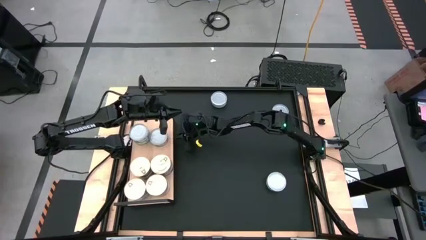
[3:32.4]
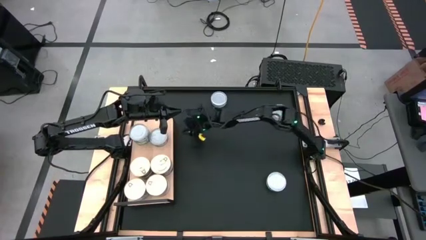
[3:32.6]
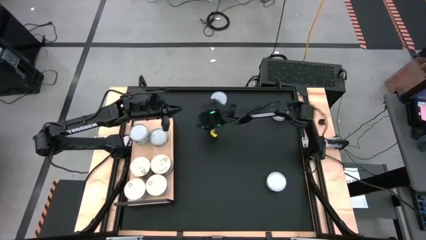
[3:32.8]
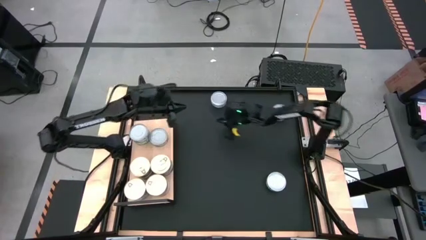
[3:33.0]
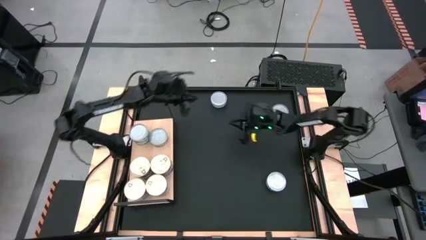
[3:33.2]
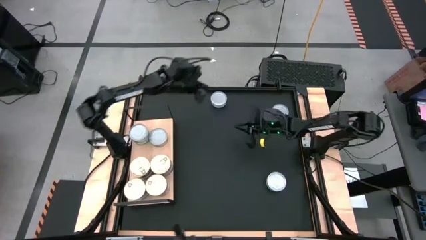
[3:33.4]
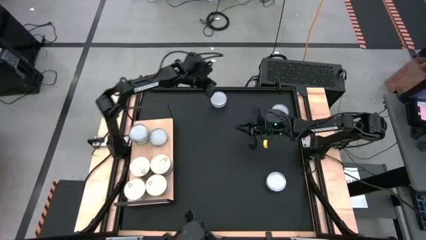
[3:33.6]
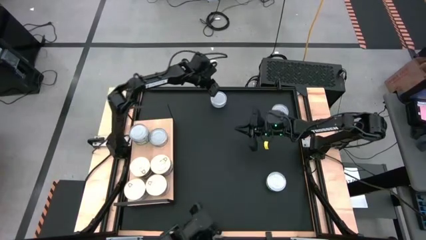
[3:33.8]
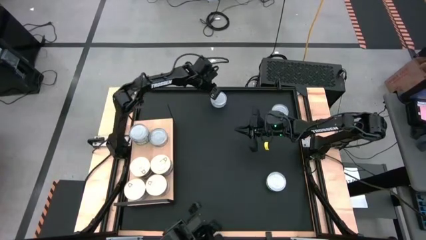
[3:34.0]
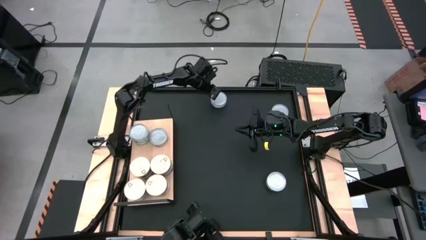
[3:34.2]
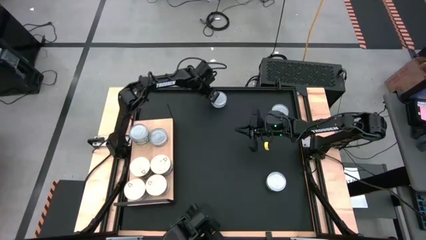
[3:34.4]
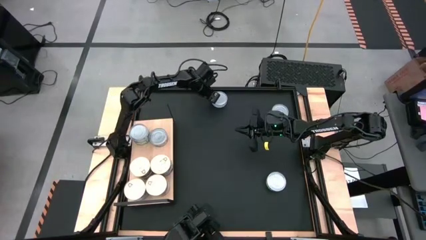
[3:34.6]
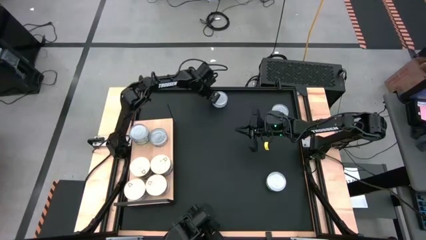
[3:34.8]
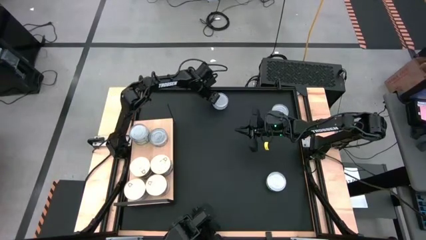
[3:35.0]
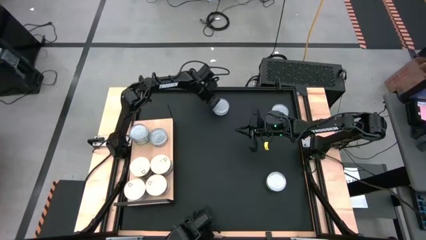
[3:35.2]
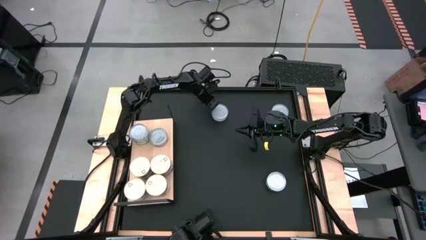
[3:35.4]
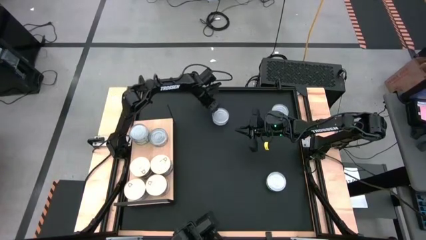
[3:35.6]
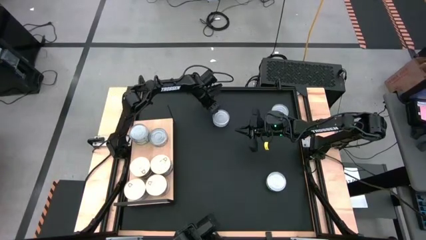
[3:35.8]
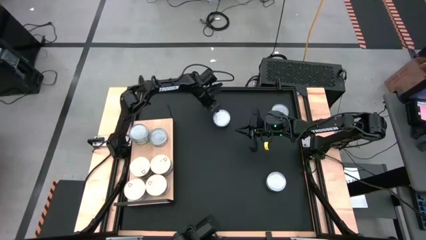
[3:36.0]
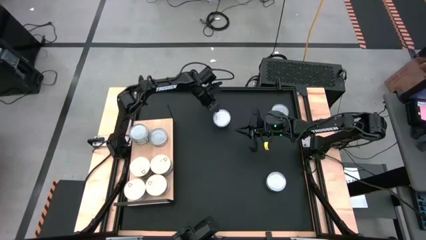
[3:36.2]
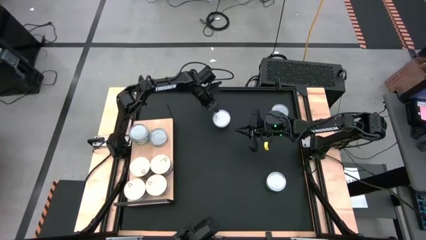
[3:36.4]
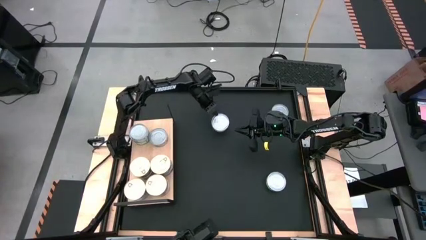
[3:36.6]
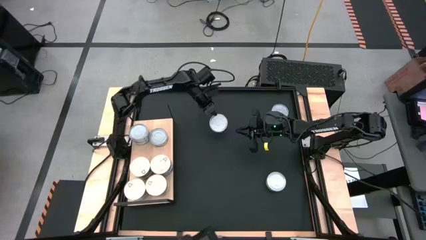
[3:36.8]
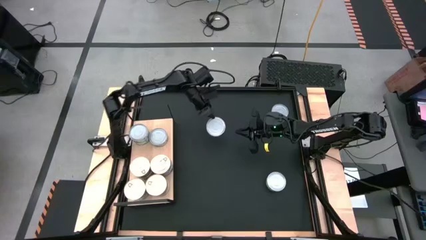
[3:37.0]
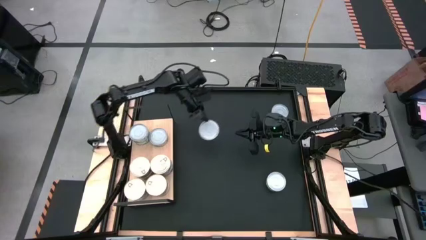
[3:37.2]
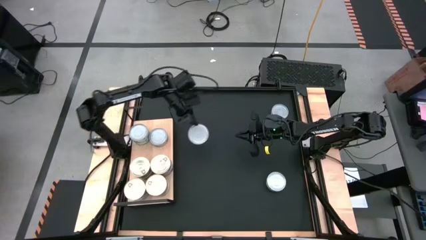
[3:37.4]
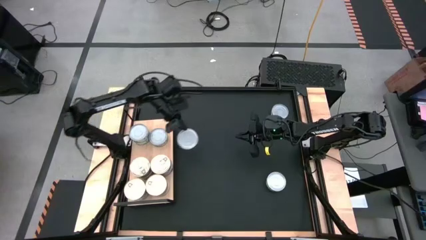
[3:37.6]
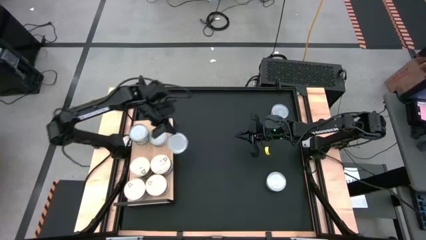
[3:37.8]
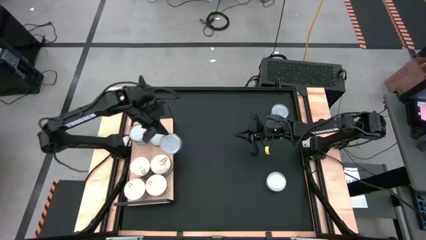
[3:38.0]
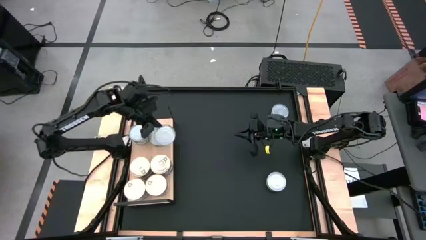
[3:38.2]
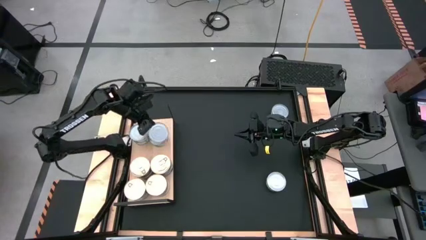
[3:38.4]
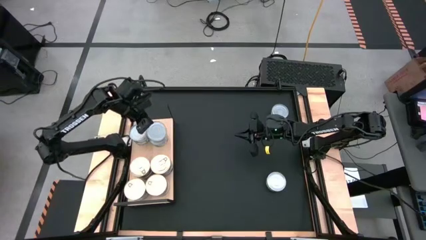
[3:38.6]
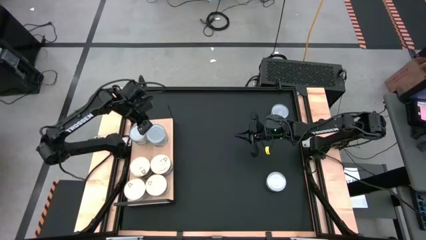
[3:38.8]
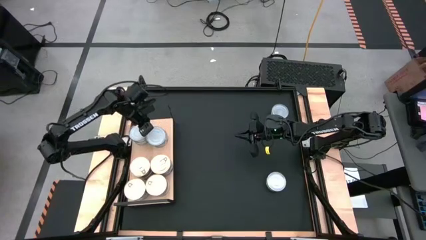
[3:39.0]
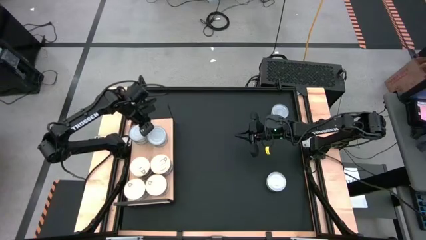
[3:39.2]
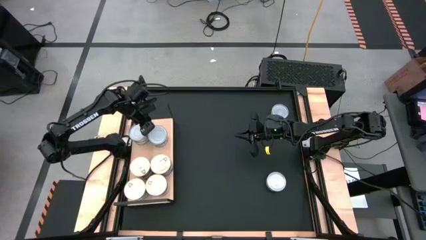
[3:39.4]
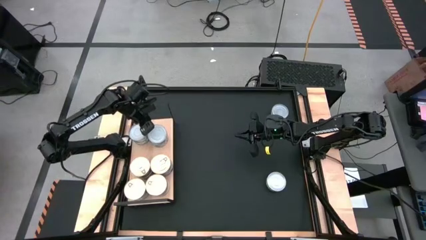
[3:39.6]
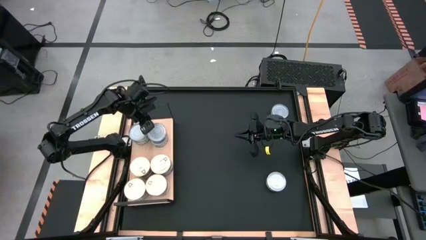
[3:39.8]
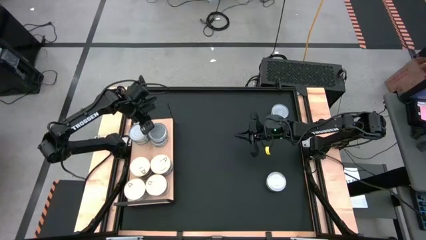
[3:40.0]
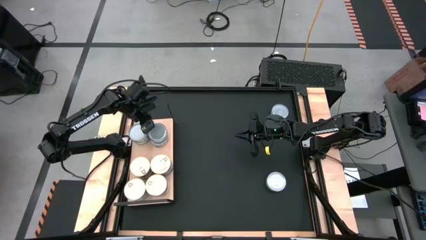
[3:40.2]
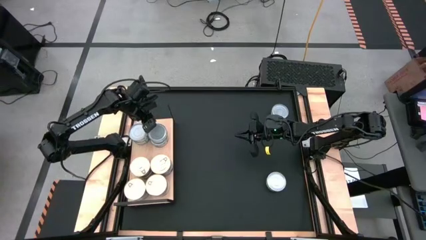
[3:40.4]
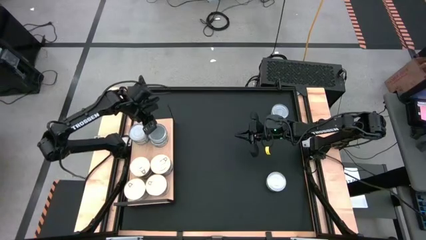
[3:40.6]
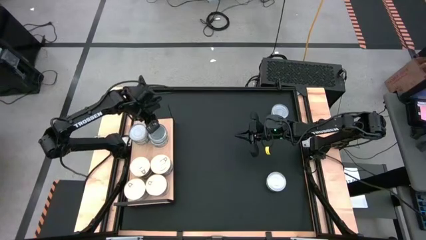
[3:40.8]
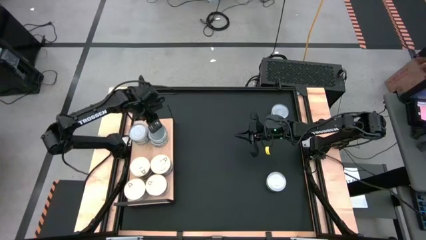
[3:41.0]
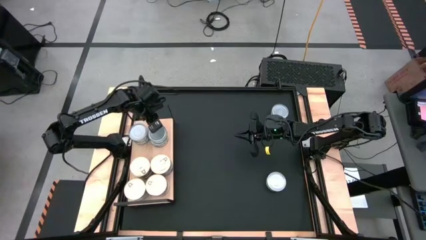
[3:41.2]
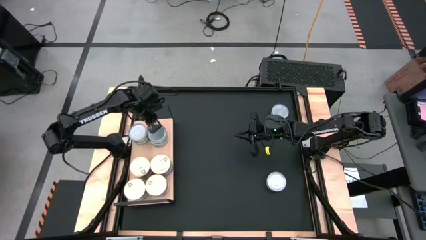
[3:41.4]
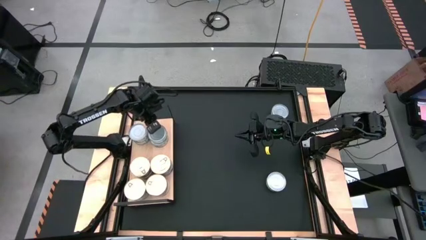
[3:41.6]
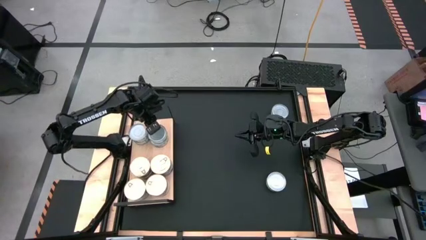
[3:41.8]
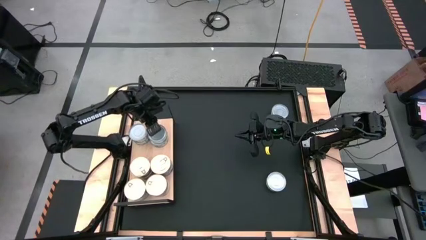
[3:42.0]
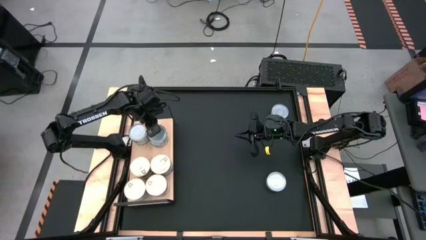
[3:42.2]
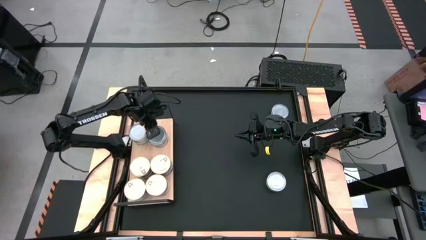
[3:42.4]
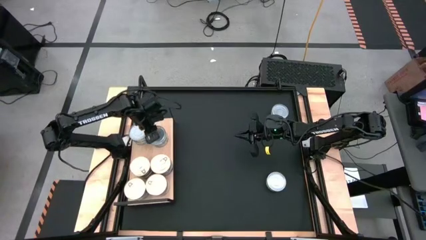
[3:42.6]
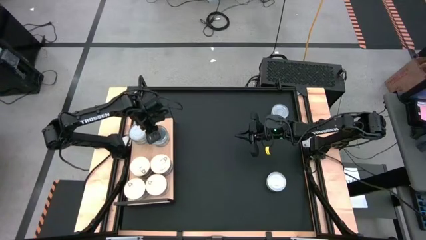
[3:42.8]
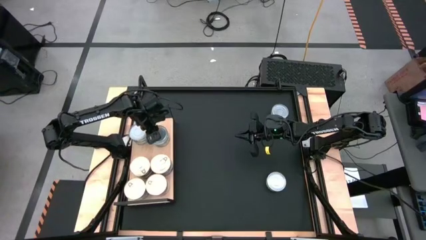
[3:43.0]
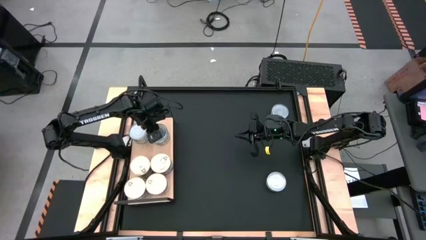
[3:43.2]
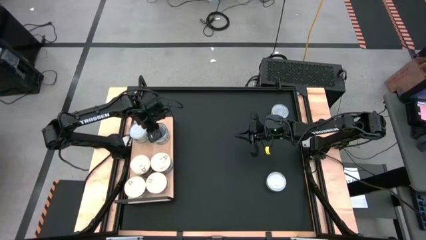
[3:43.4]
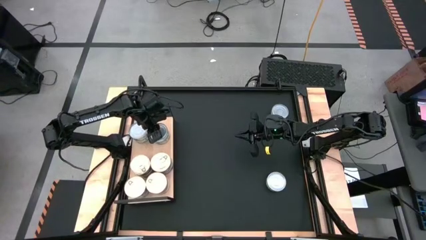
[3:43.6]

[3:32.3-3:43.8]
Task: Stack canned seafood by type on shelf
Stack the green tuna can on top of the green tuna can on the shelf

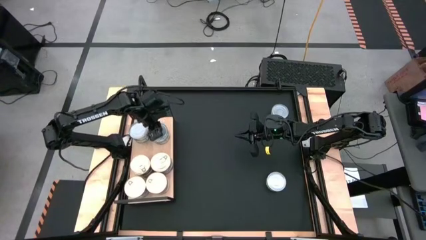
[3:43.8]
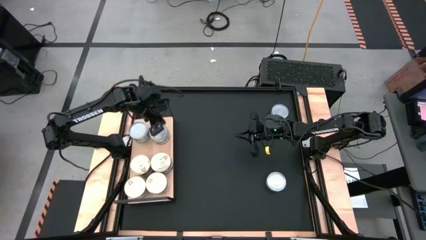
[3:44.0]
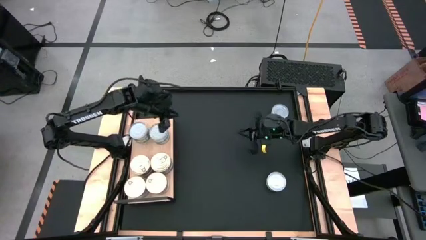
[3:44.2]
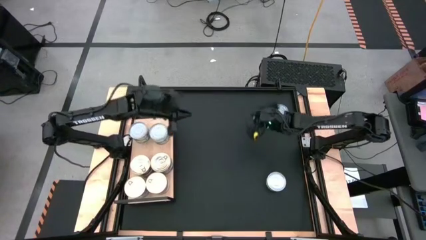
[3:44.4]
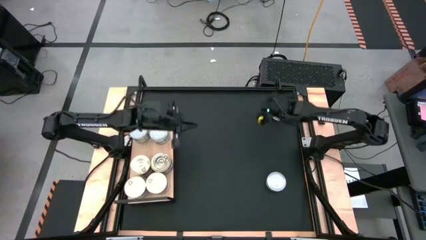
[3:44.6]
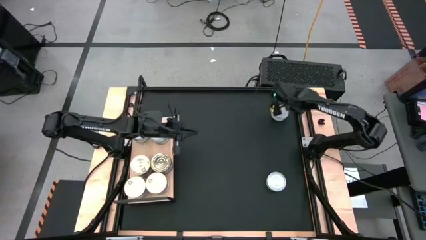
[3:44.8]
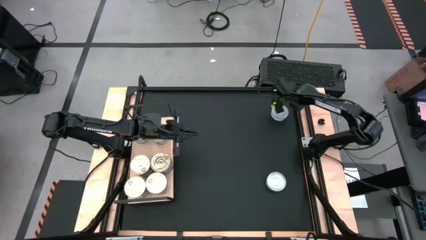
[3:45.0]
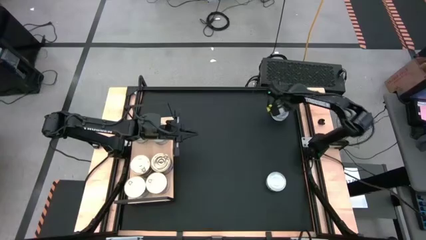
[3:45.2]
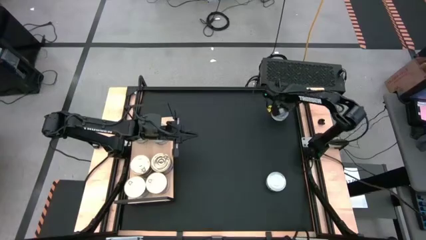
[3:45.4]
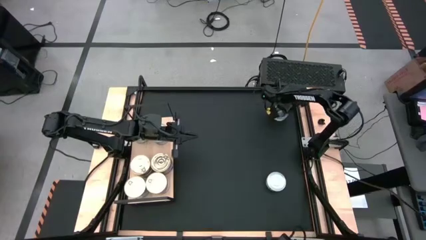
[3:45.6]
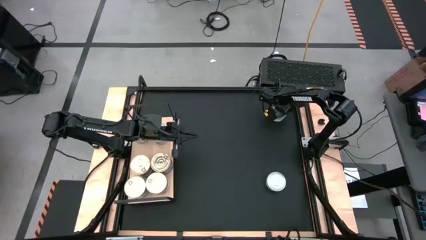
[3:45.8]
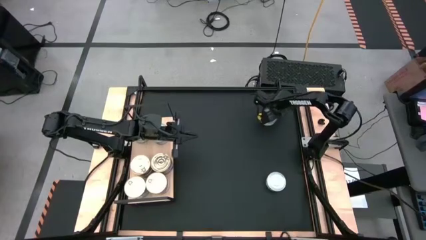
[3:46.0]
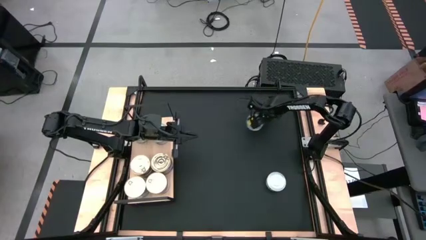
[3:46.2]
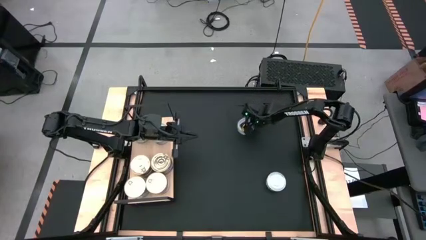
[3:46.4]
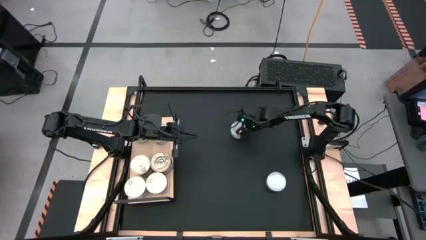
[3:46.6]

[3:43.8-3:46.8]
Move the top green tuna can to the center of the table

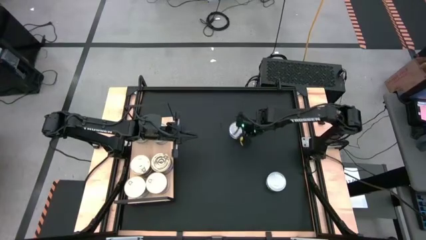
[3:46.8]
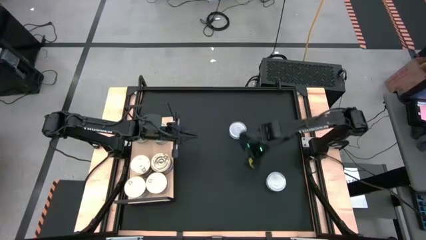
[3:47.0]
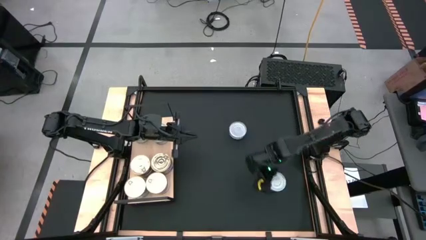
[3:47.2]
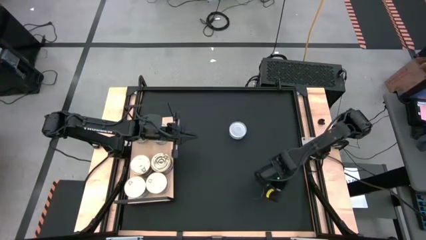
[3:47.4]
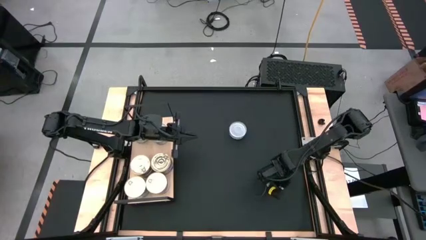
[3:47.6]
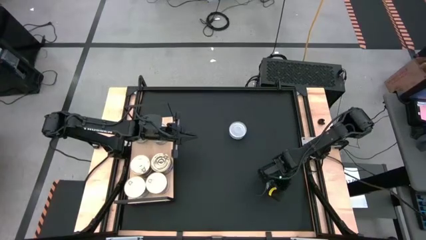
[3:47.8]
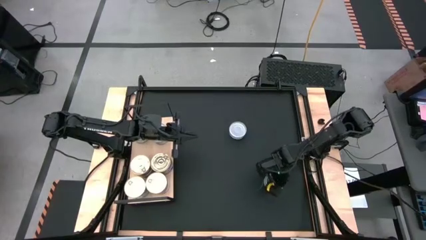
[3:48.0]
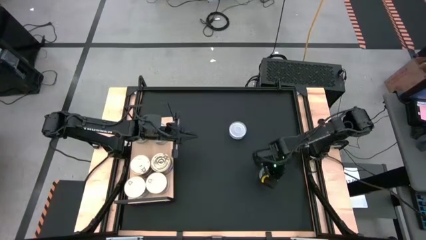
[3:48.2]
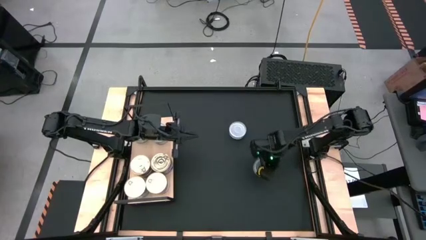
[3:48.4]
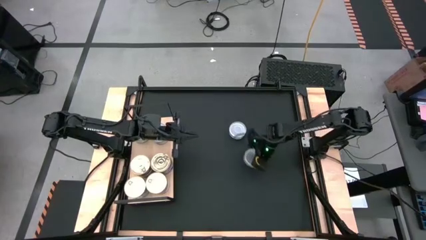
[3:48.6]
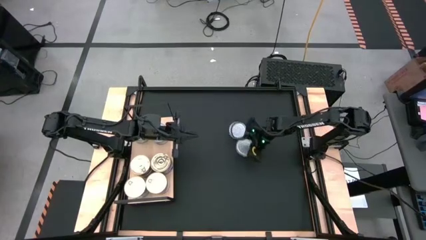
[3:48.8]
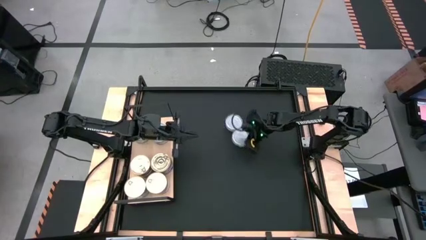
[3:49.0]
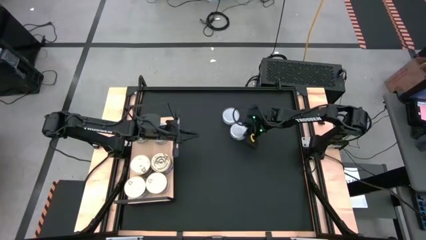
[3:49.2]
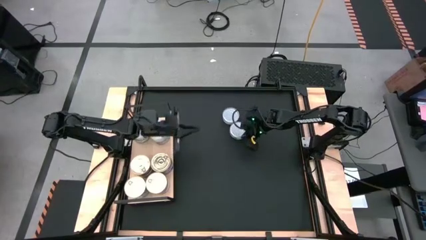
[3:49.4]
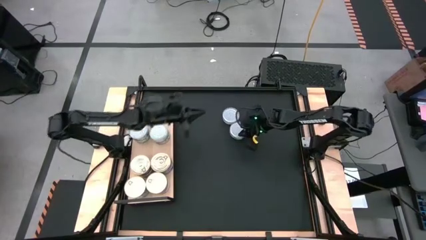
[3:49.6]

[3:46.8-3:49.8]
Move the bottom green tuna can to the center of the table
